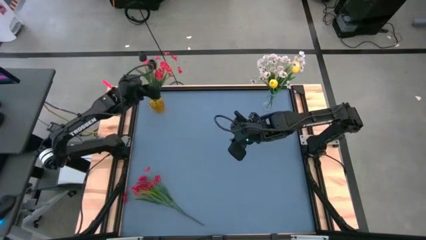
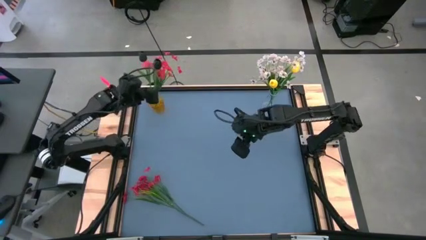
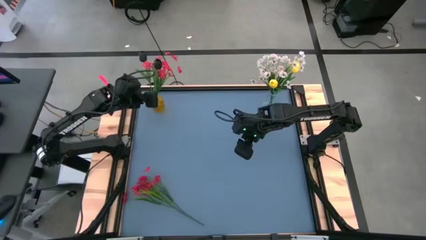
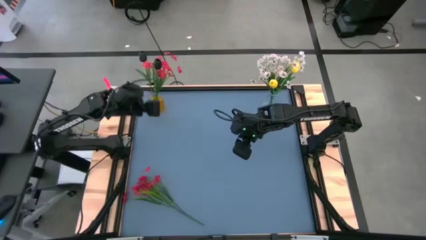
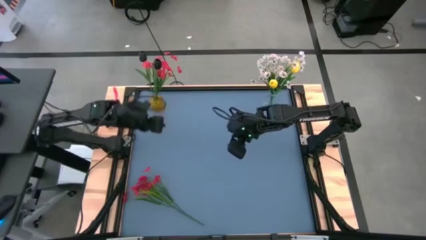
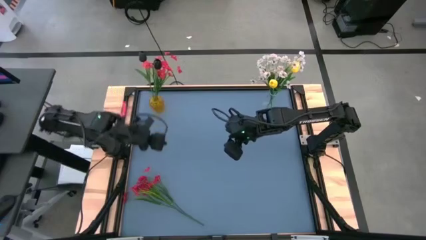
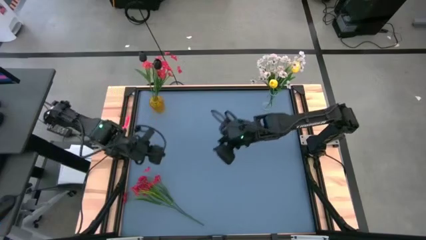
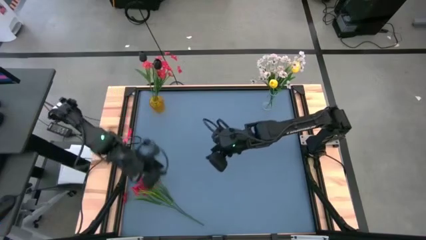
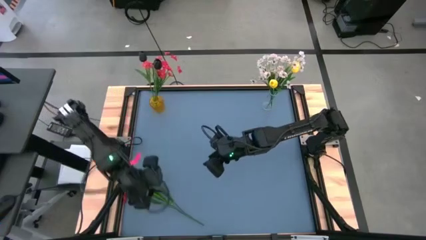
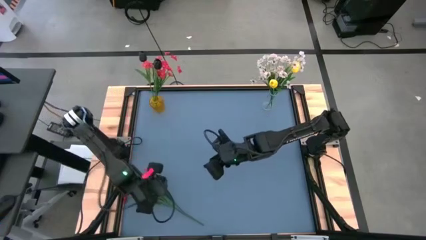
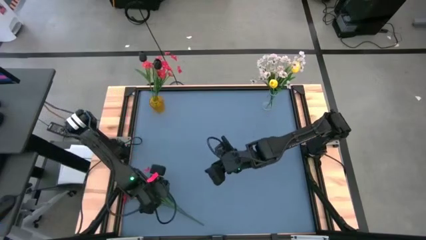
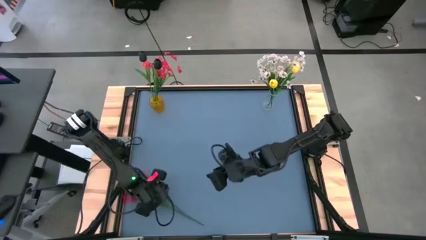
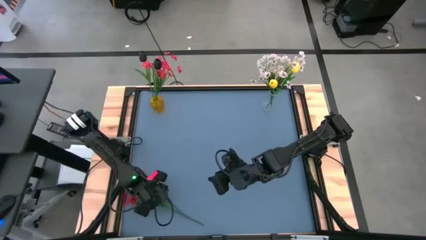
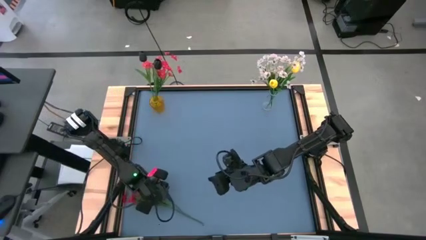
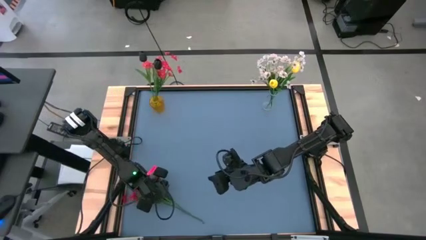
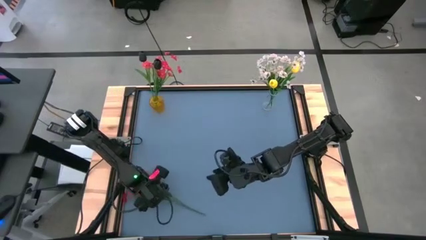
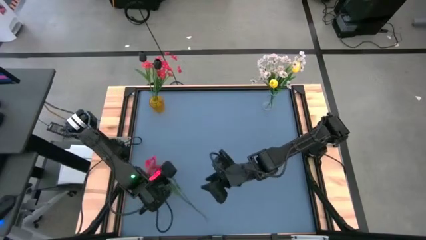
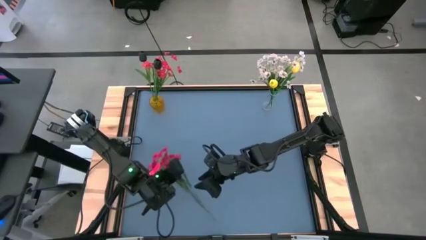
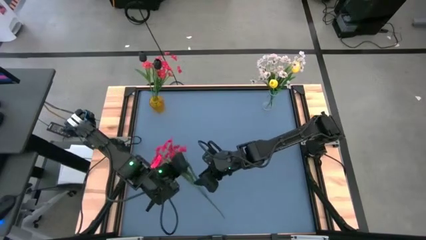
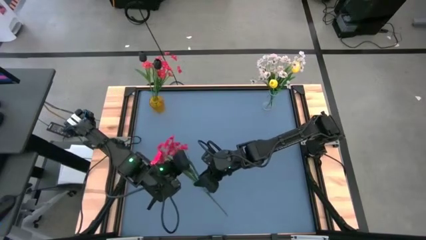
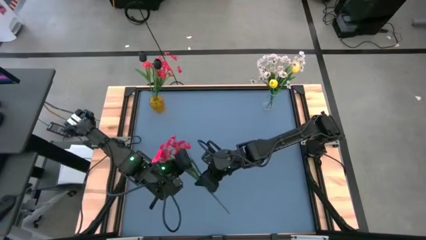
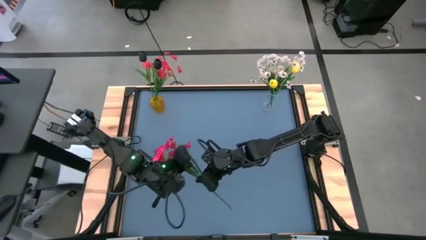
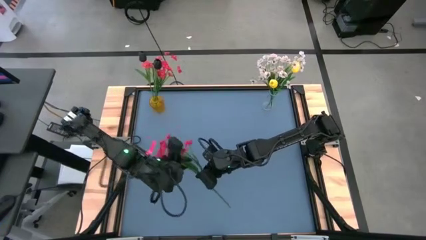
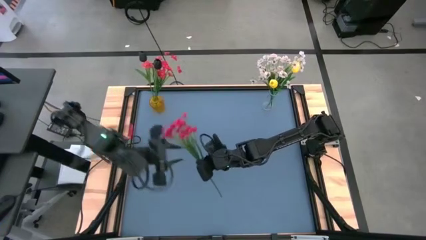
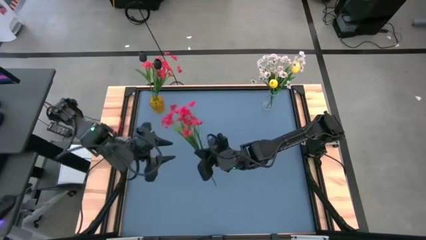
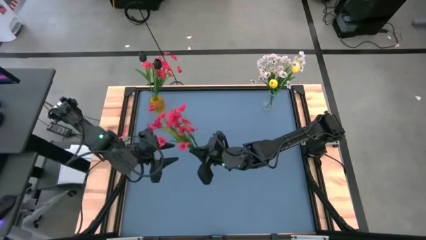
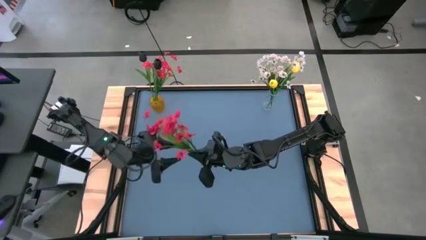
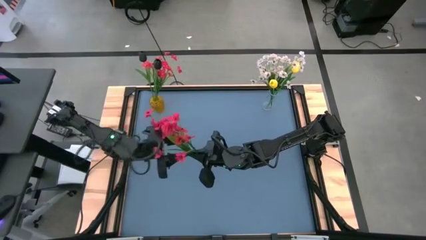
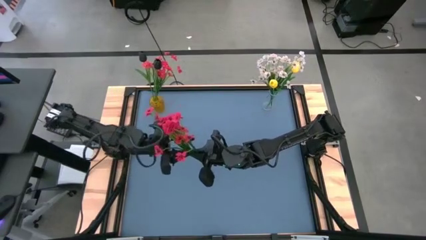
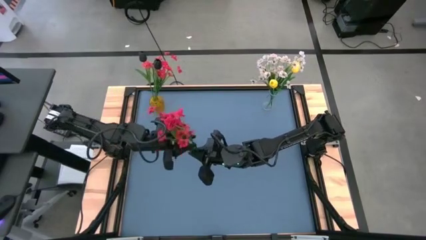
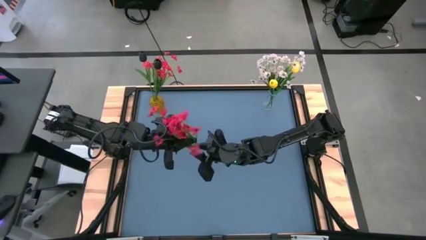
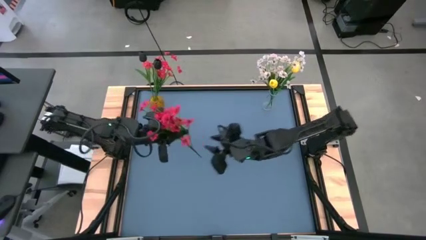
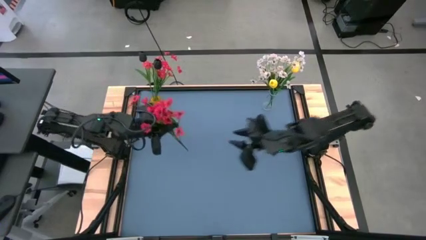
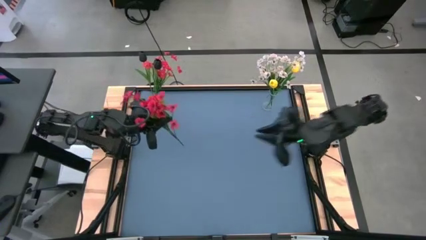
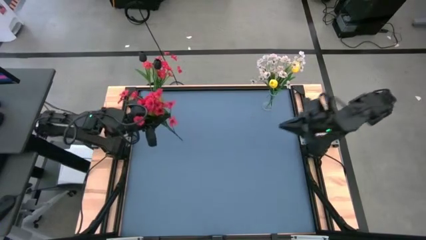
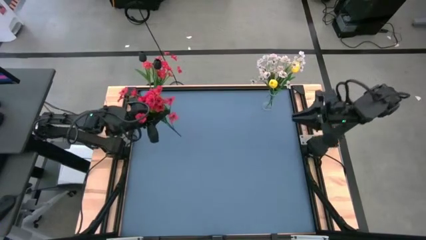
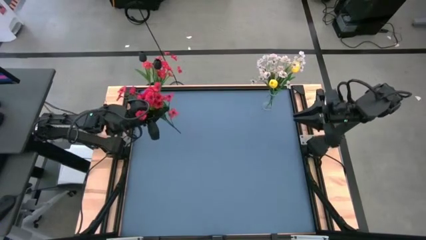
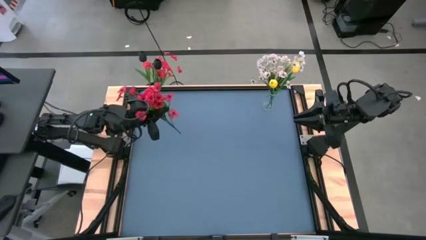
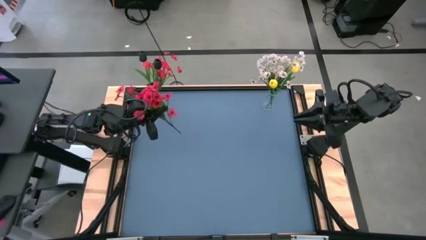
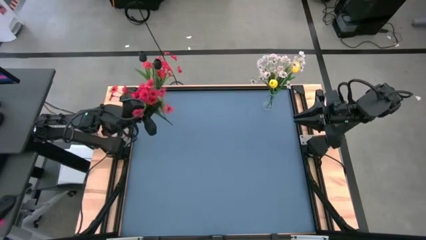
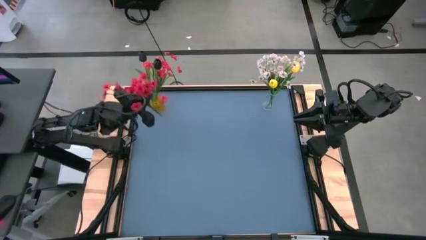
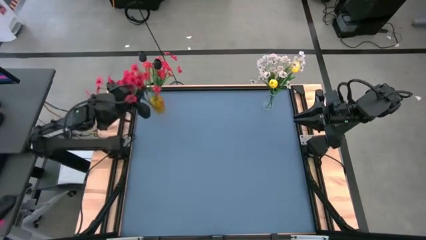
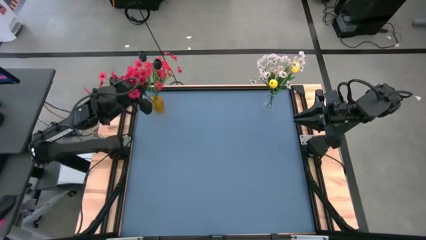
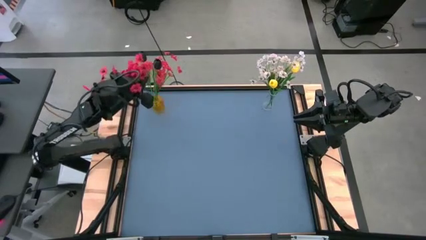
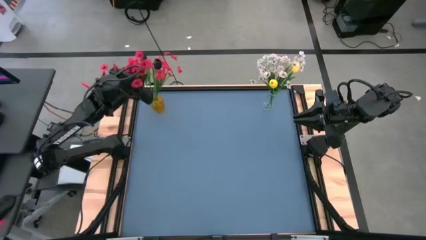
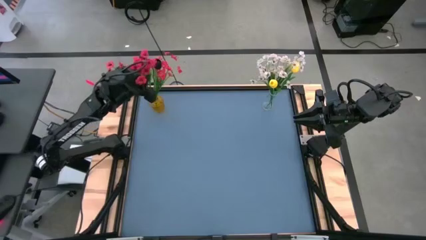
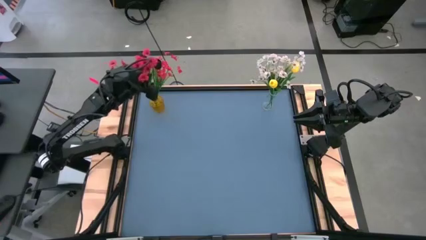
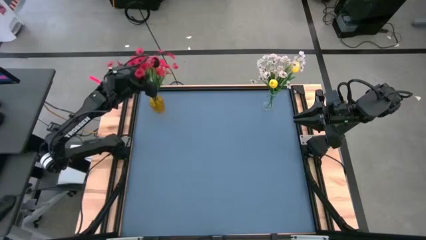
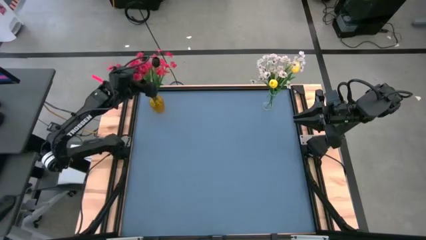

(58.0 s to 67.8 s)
Task: Sort flowers into vase by color
Put the red flowers into the yellow vase

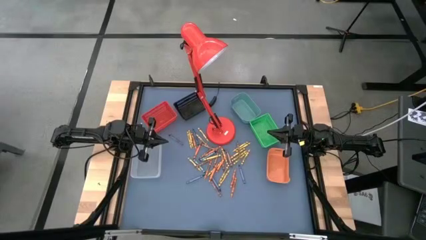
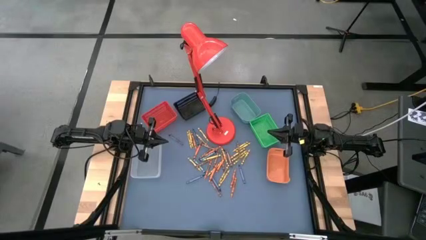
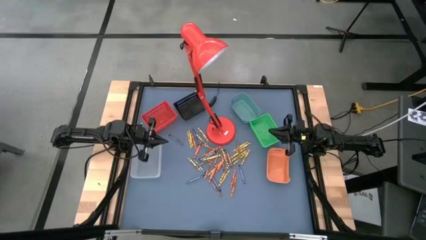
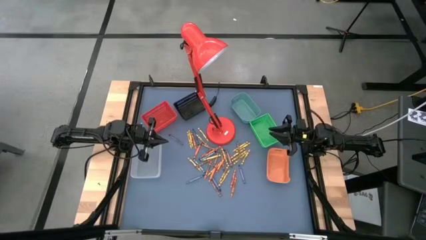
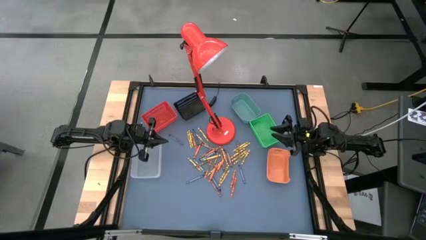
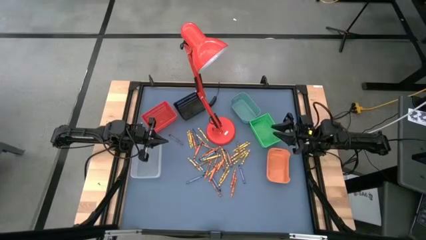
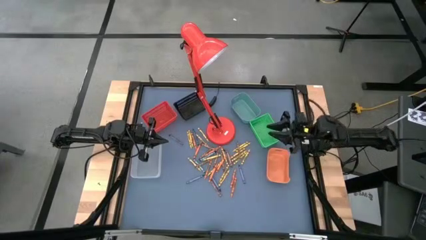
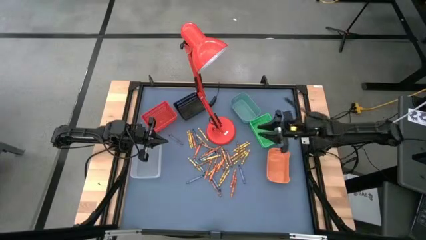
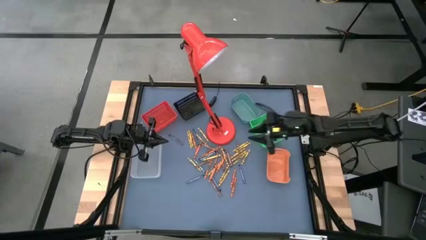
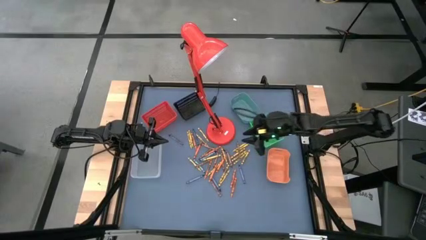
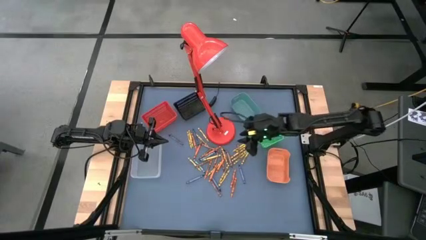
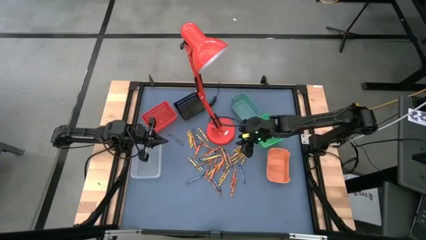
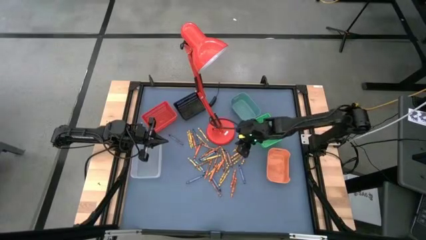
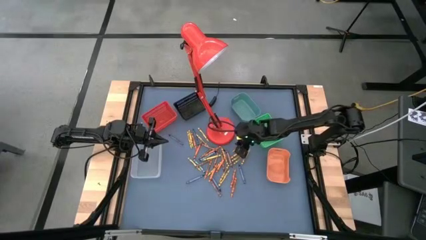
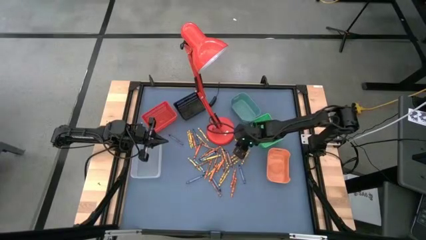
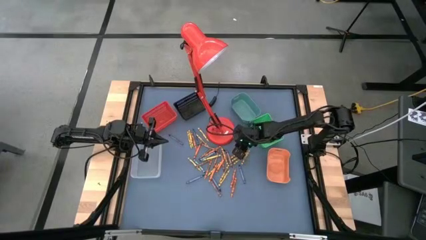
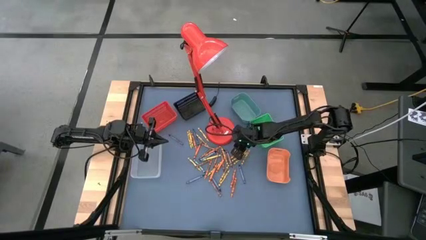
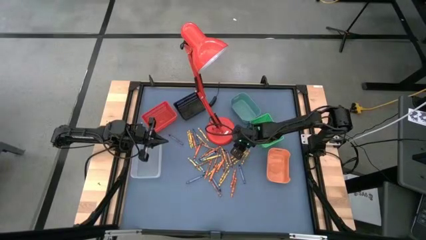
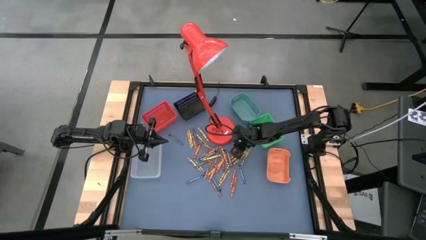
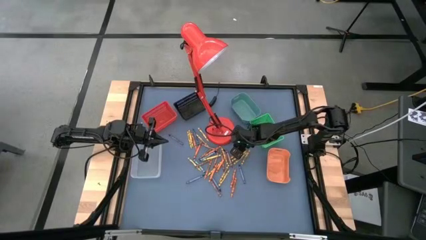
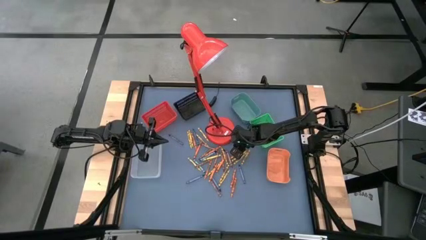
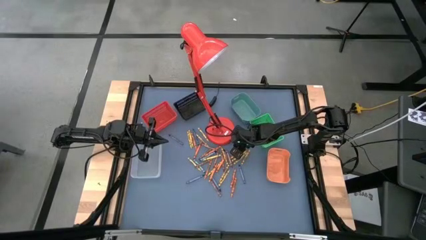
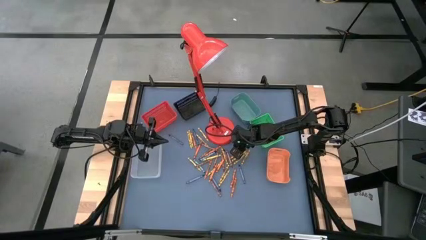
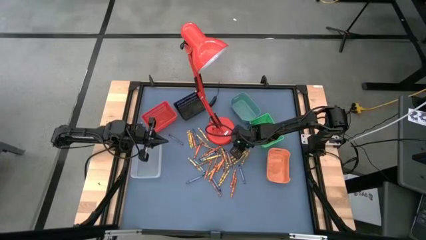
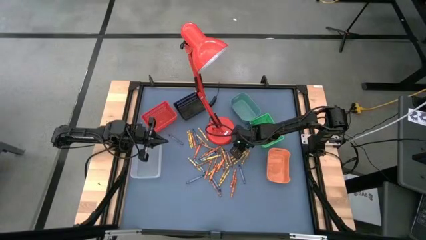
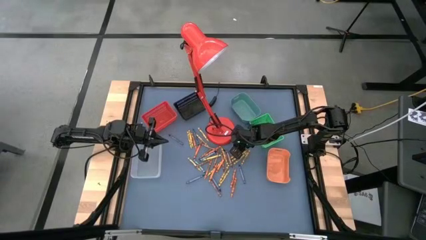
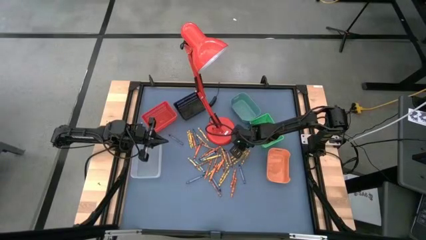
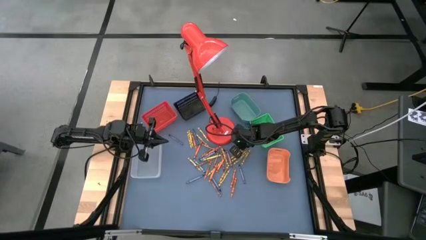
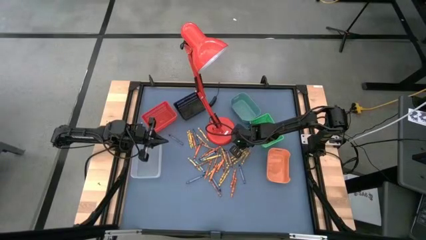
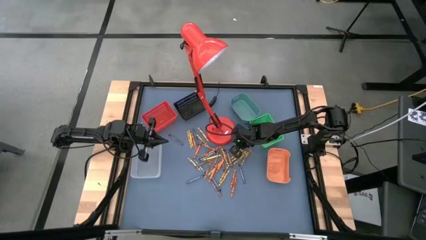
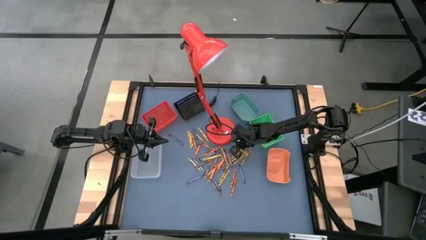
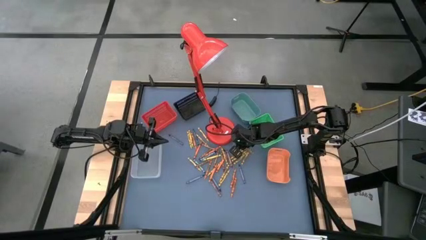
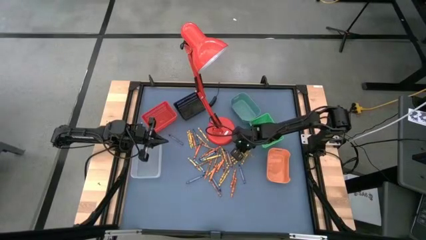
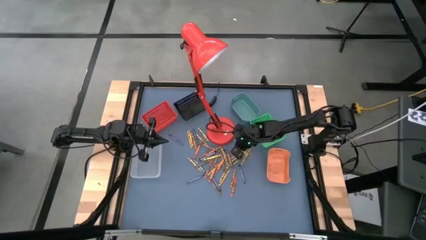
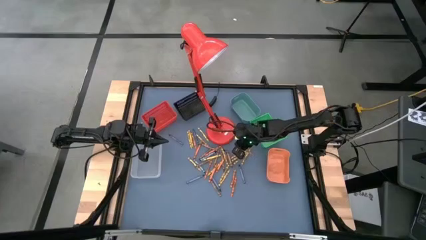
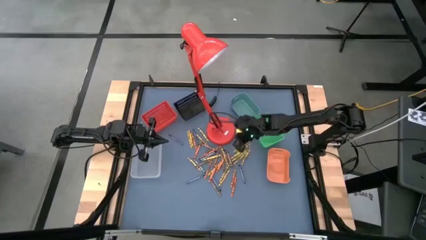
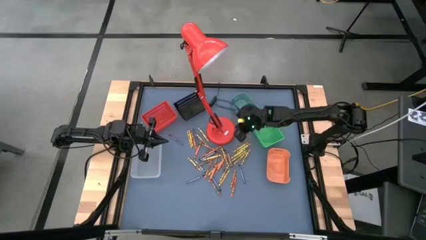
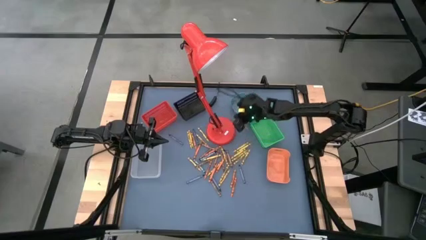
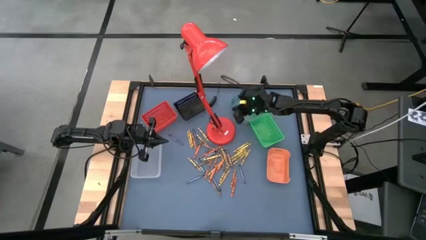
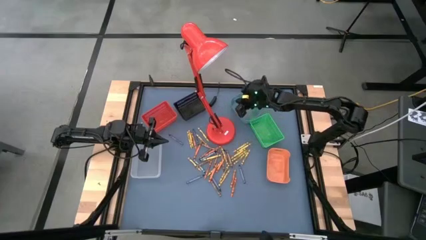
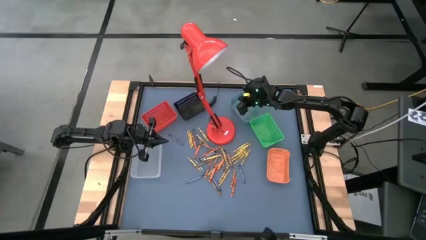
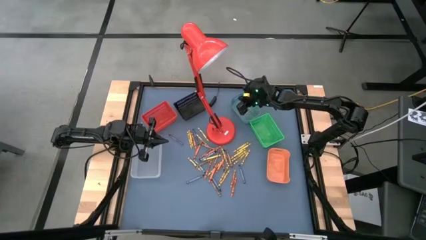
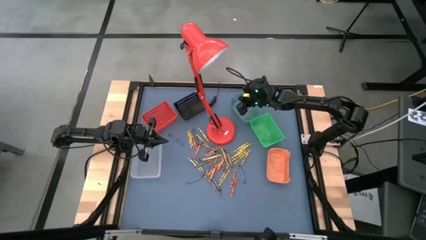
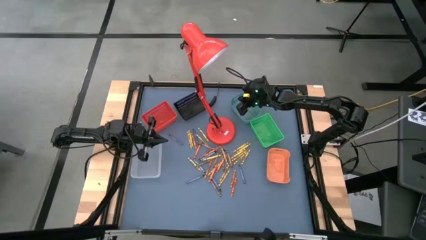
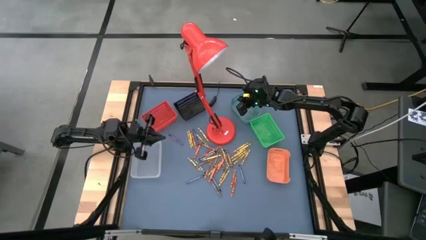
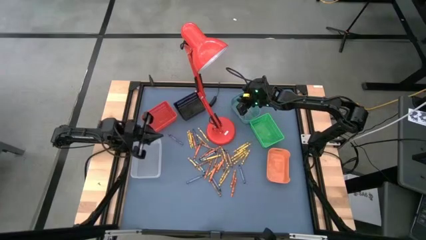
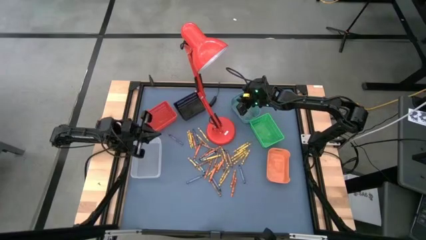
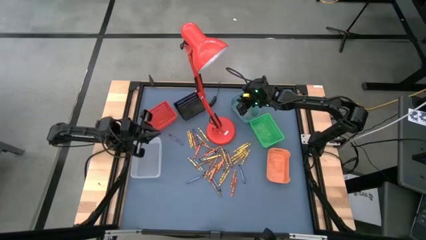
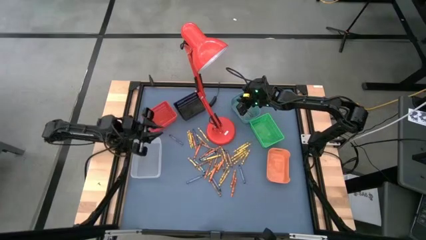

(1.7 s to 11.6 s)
Task: Sort crayons
Put the brown crayon into the top right blue bin
